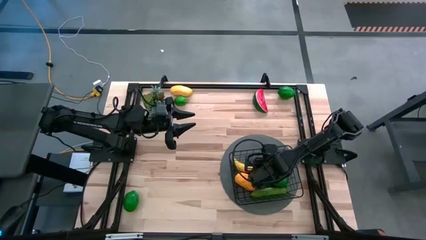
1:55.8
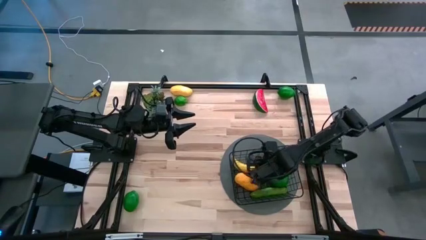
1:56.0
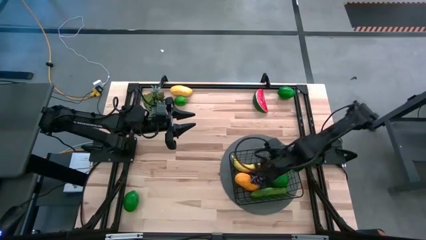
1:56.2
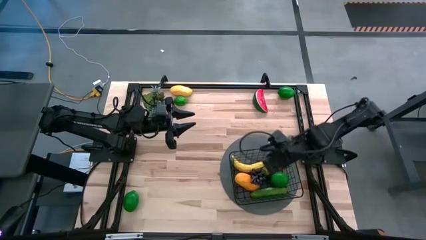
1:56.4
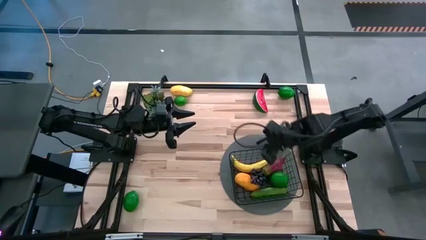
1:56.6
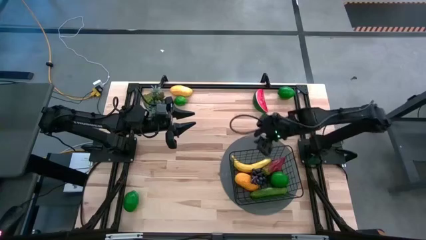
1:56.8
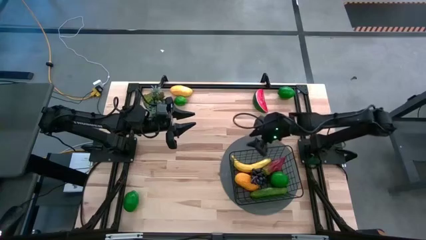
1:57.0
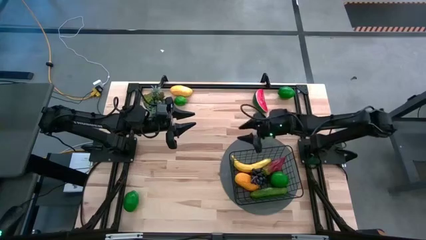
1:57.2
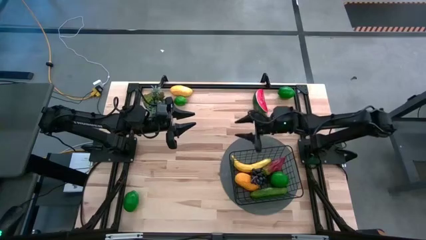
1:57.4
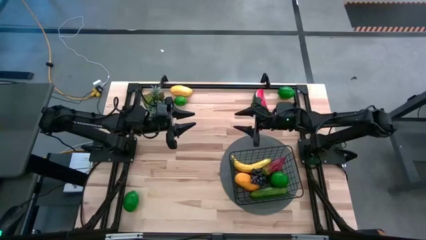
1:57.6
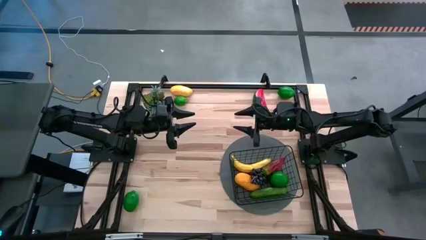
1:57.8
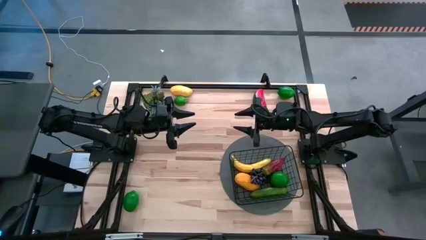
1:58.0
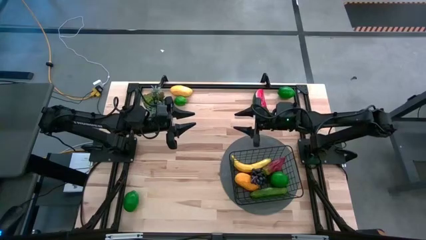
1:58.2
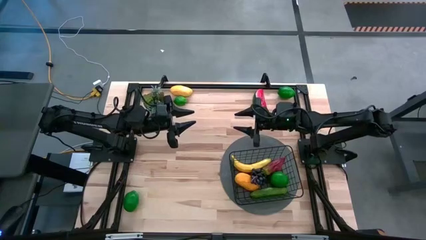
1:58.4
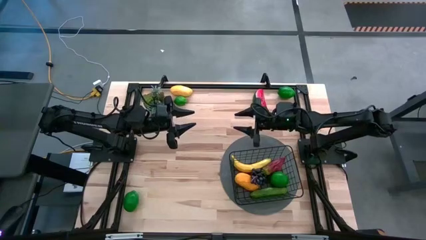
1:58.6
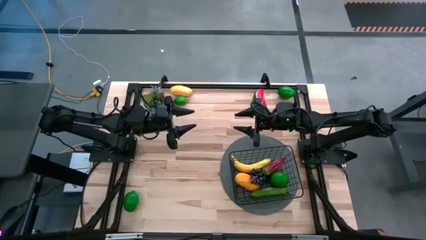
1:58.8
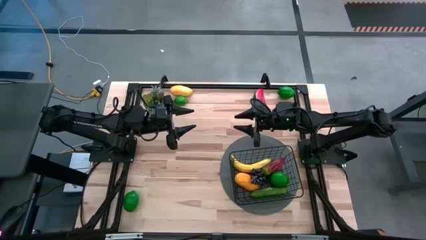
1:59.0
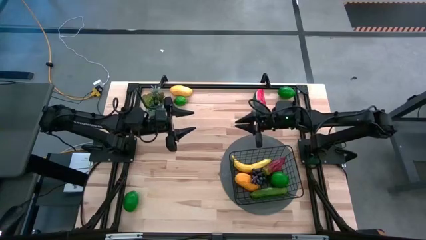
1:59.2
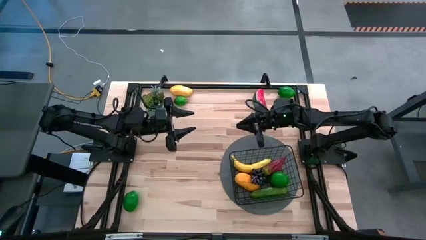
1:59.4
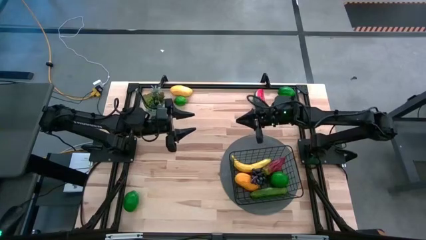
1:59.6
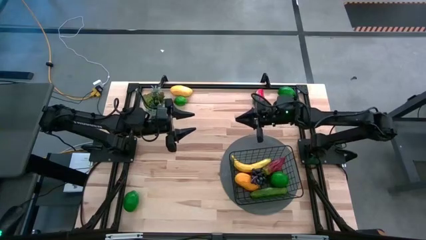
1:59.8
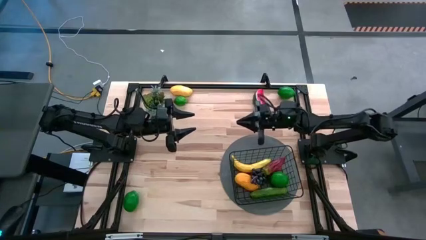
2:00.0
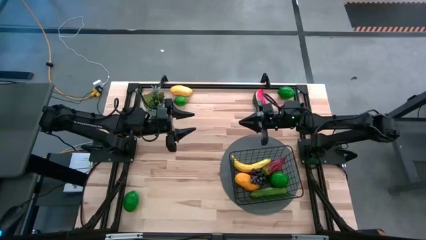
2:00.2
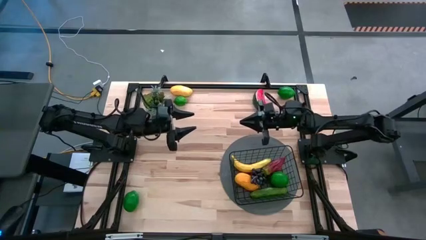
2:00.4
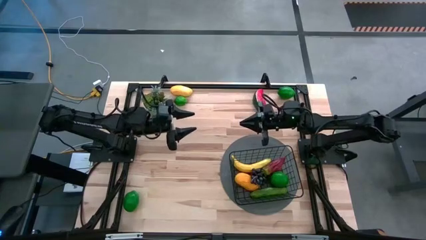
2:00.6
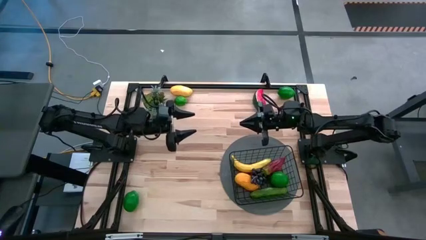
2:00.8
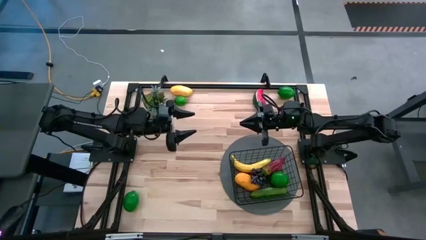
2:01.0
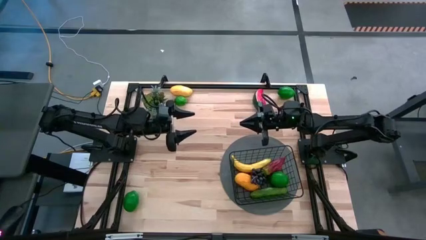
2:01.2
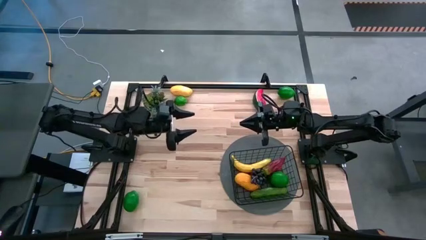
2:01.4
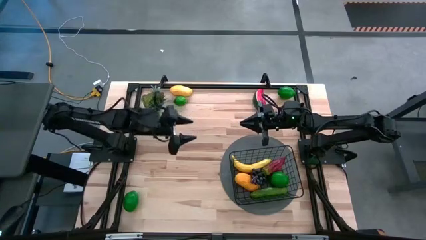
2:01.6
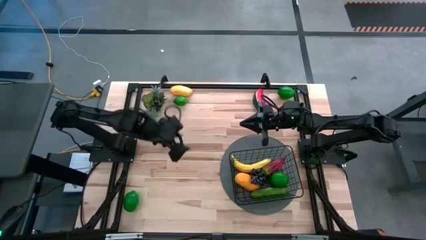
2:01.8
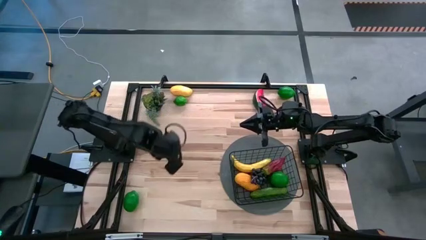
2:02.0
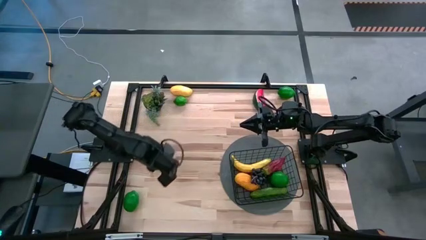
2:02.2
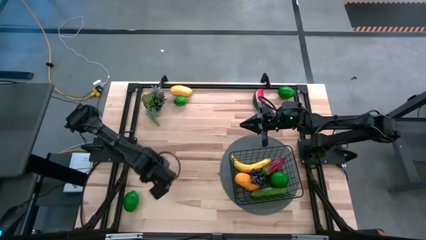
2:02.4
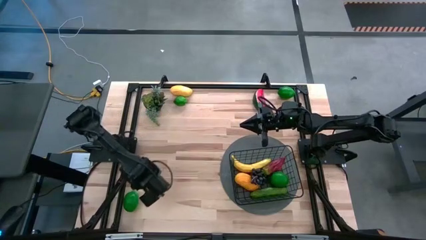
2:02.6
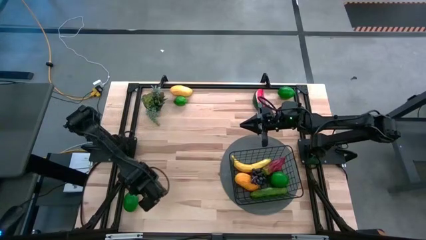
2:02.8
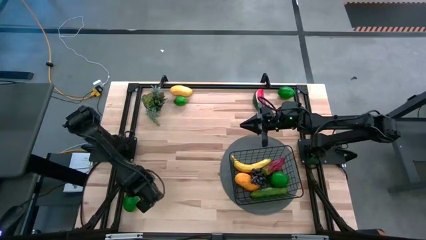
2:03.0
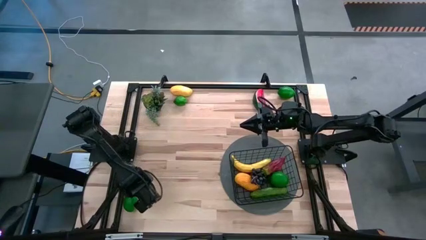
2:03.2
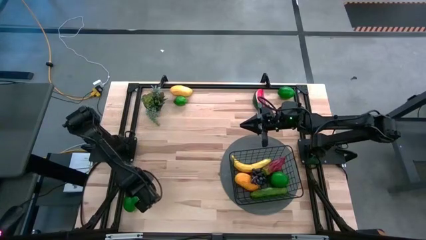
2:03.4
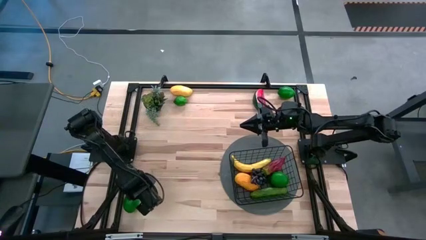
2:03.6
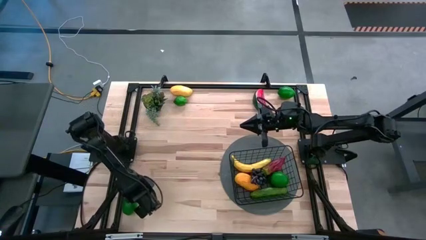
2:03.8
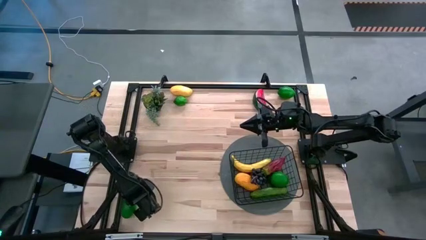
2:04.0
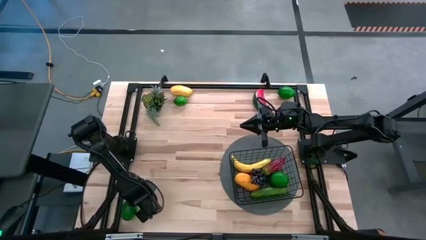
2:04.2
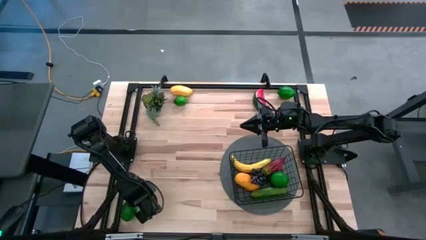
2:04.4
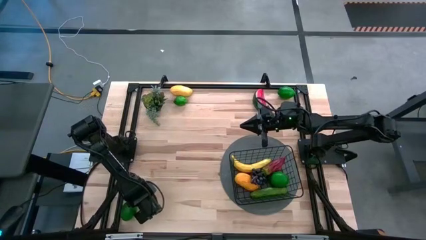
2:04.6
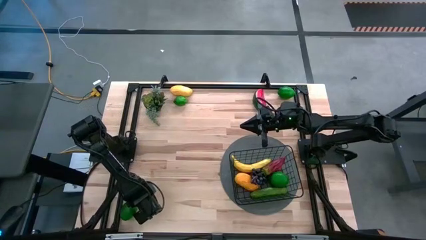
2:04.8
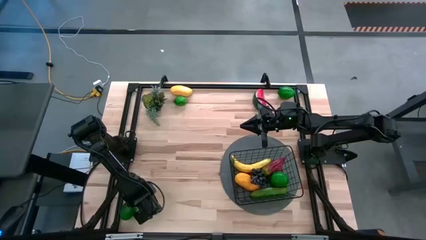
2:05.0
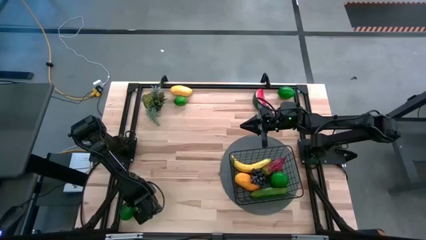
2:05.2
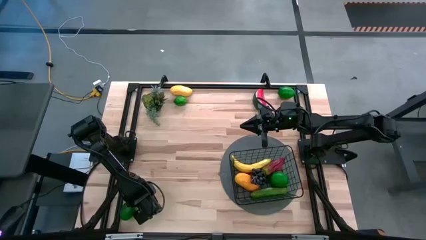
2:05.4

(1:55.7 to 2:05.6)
Task: Build produce basket
Put the green lime into the black basket

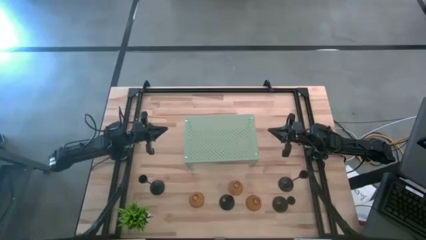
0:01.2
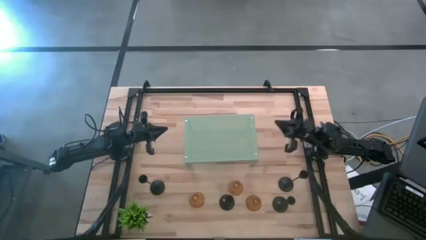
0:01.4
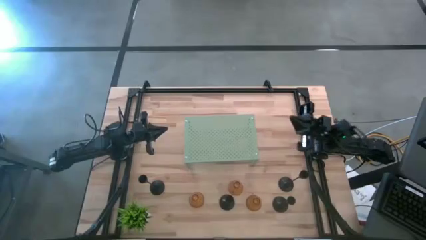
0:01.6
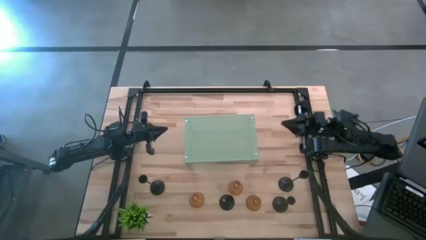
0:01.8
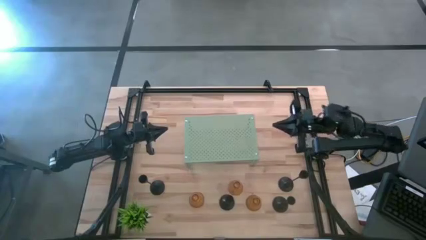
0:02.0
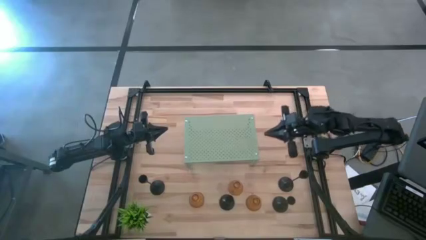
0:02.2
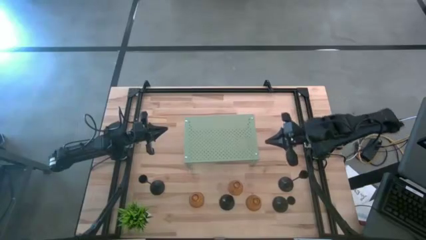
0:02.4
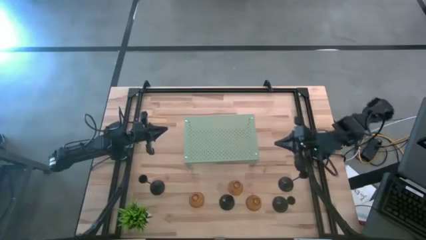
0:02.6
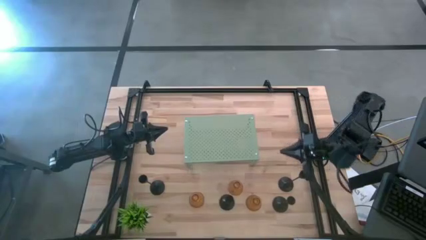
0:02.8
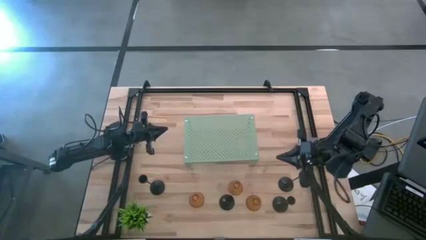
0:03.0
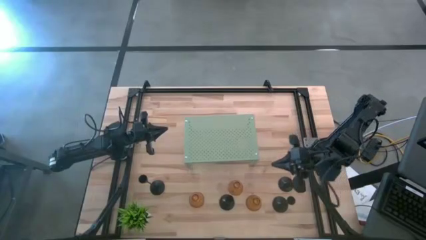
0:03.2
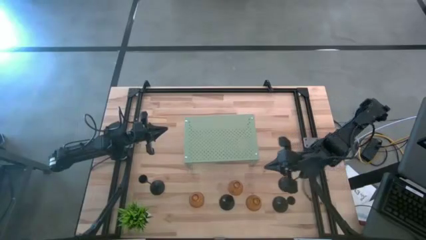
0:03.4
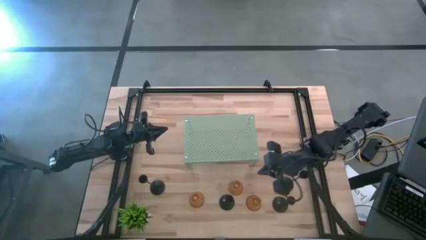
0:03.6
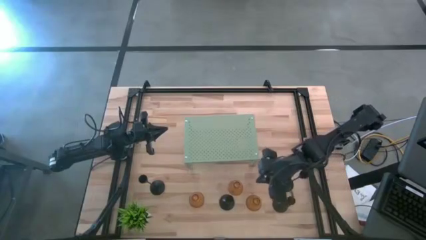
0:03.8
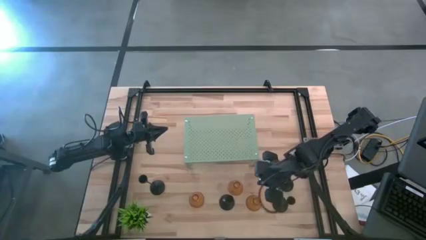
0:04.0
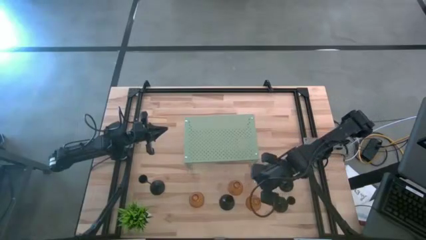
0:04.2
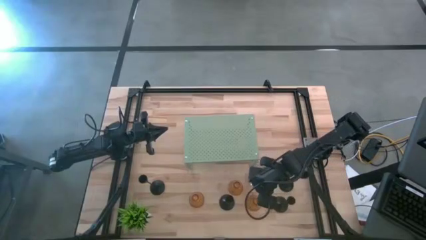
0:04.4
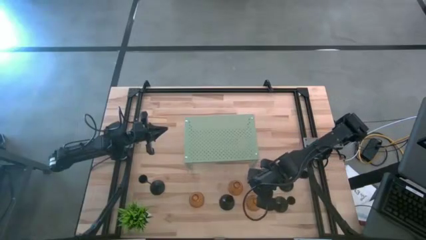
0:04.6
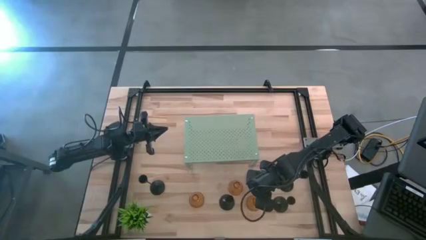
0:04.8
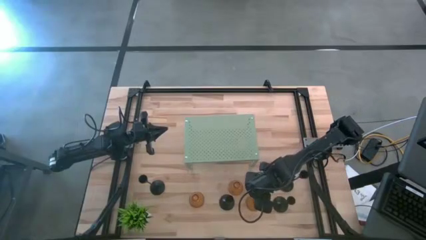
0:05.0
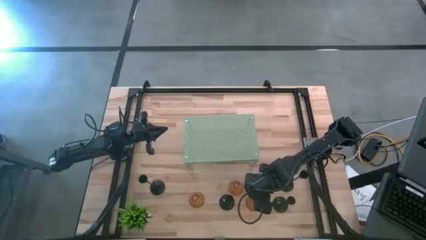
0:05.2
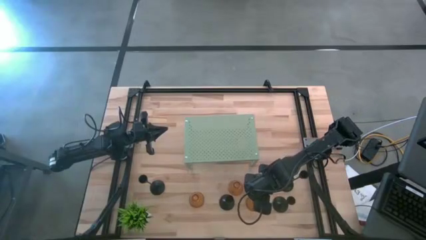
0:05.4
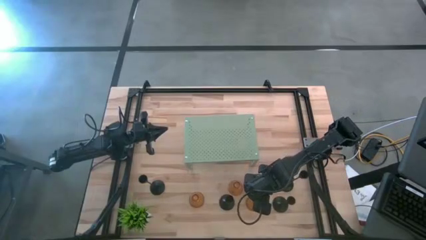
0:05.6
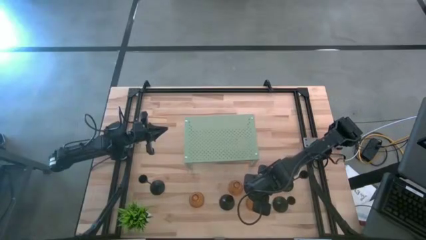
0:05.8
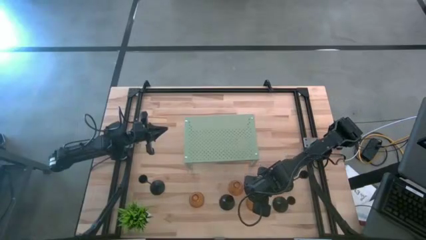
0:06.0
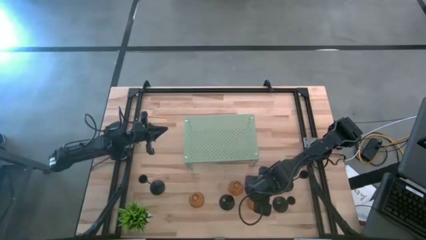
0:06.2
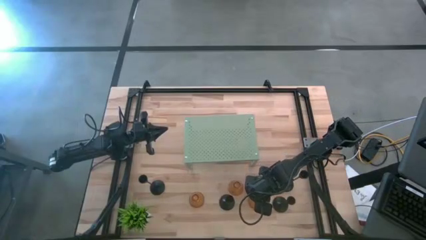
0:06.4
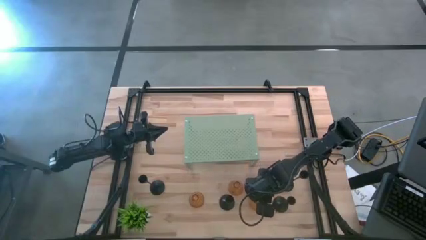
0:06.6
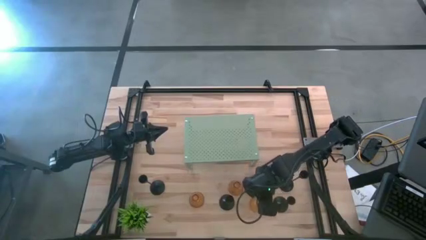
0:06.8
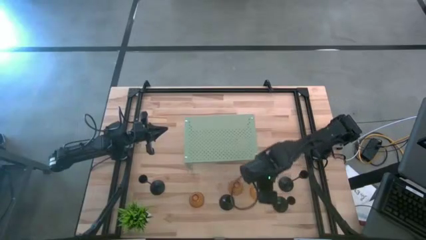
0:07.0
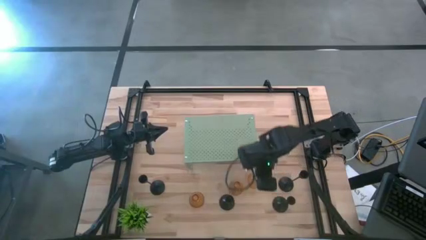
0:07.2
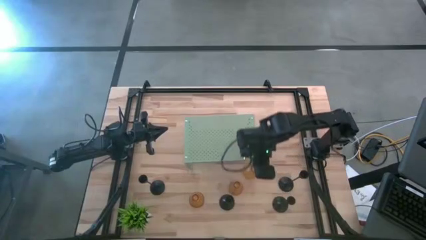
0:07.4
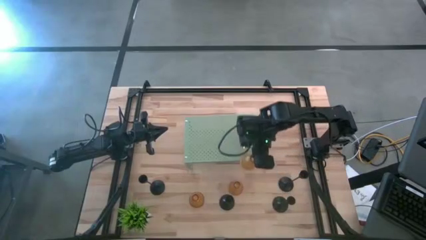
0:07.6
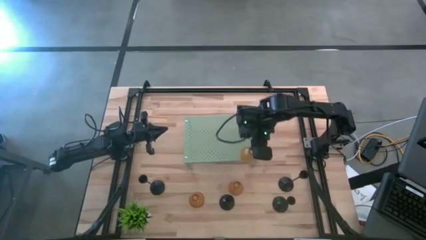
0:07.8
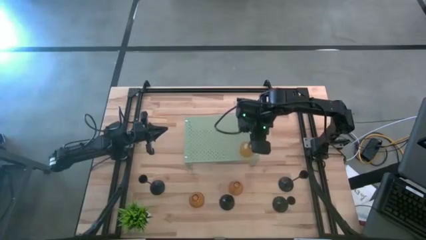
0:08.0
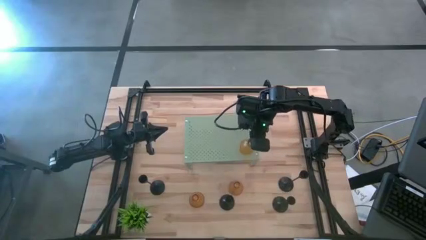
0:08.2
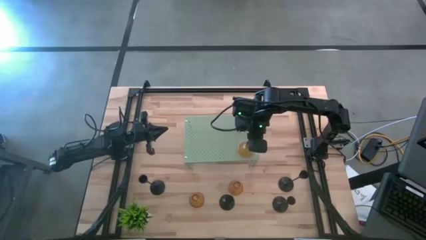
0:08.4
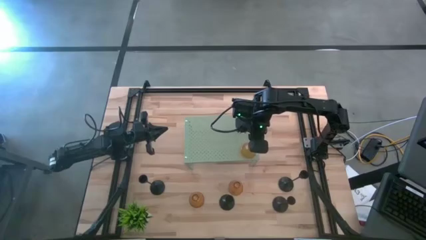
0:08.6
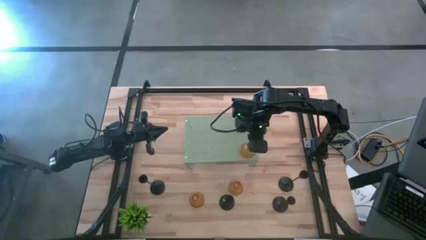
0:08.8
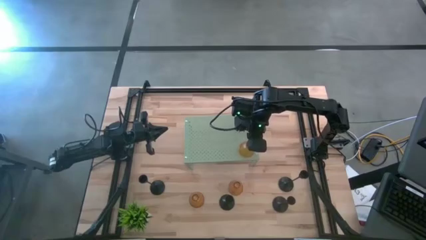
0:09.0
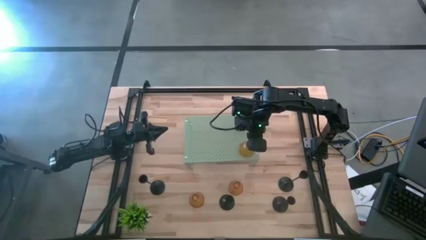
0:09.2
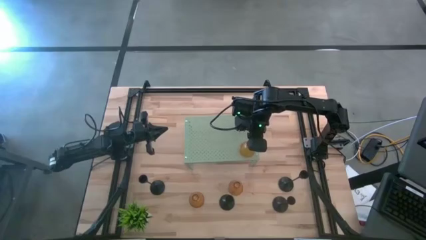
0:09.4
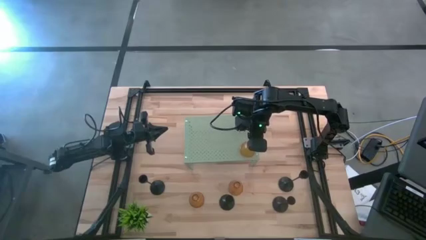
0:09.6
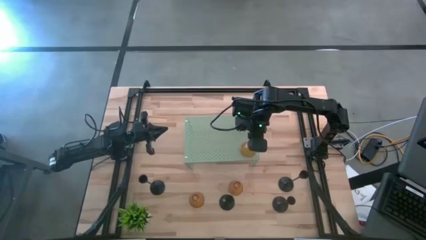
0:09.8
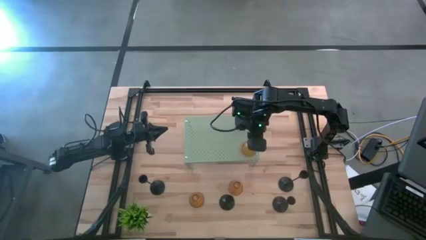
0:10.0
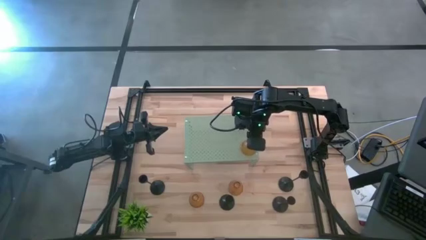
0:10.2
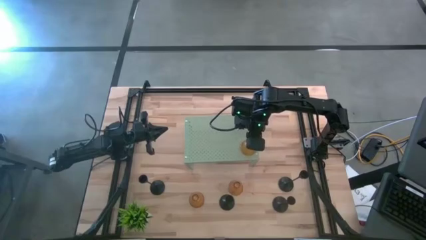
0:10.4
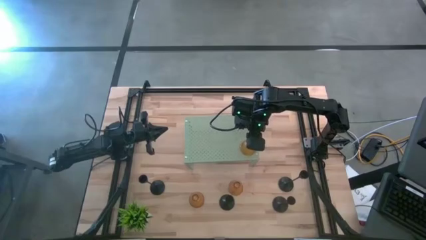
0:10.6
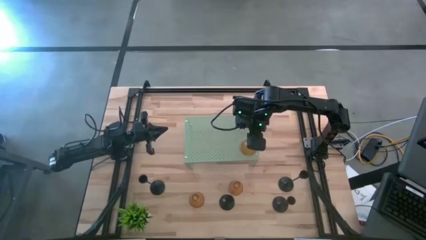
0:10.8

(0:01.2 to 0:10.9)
Task: Pick & Place candle stick holders
Put the yellow glass candle holder on the shelf
